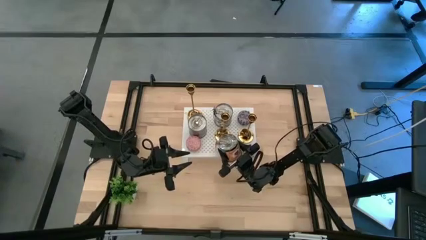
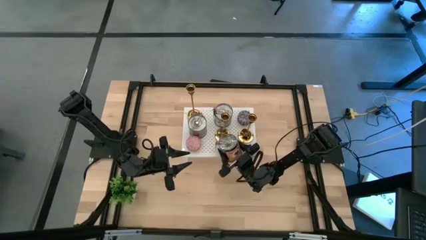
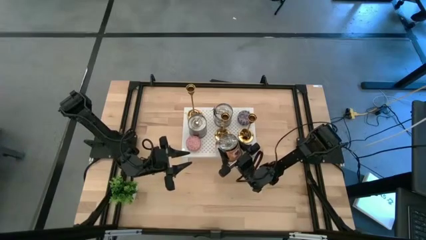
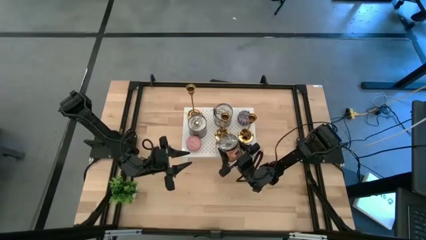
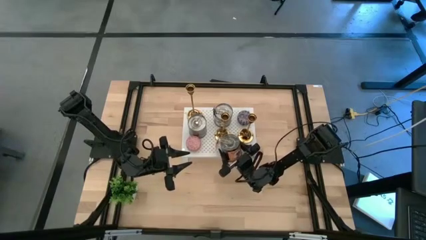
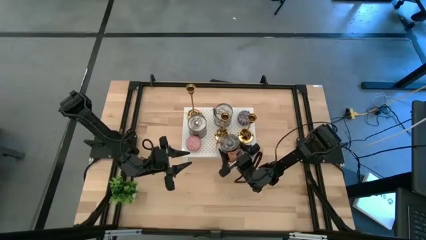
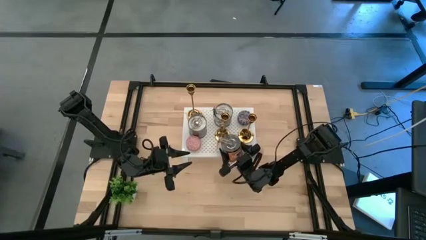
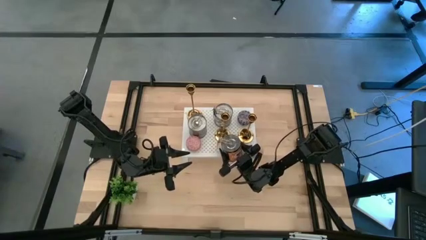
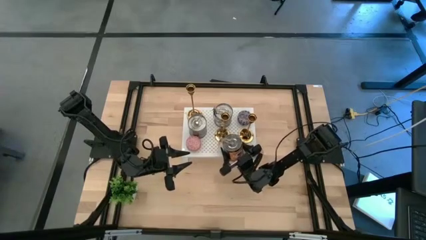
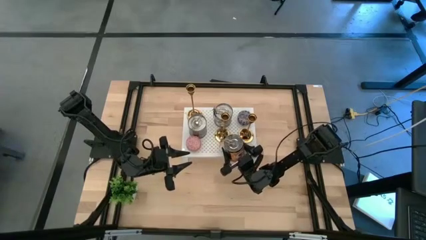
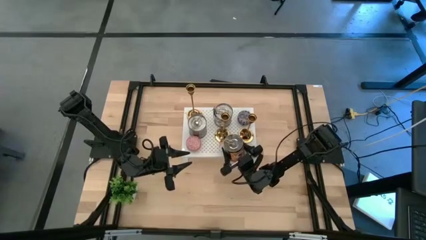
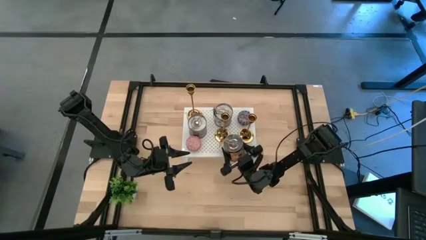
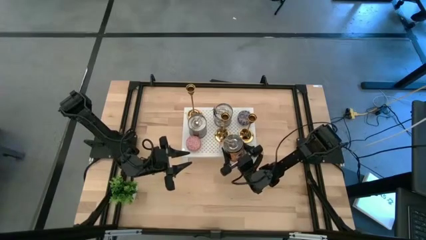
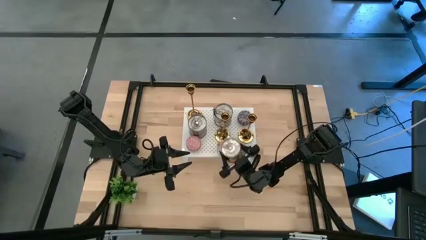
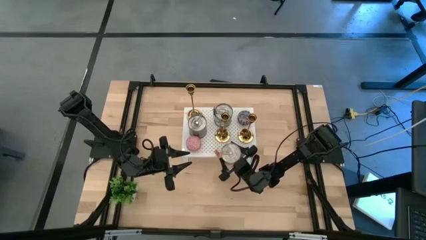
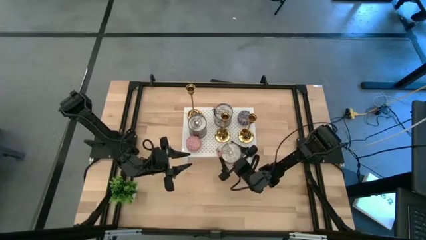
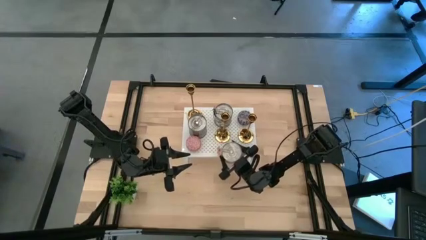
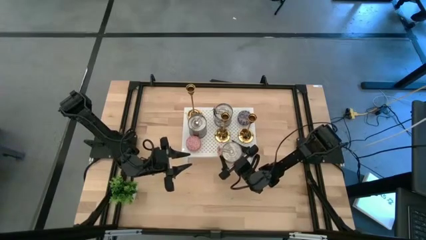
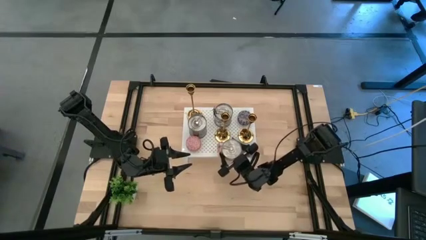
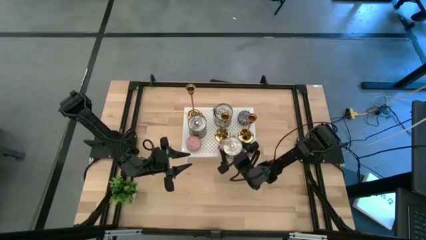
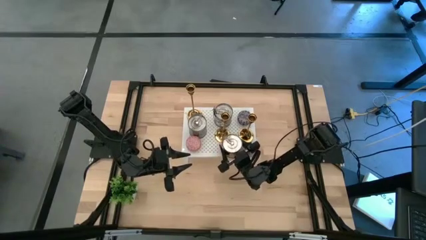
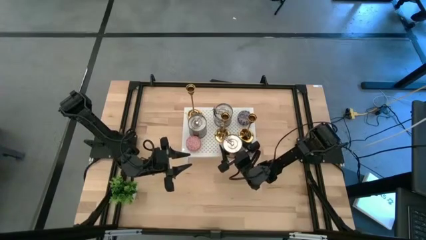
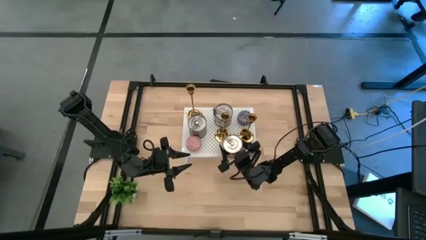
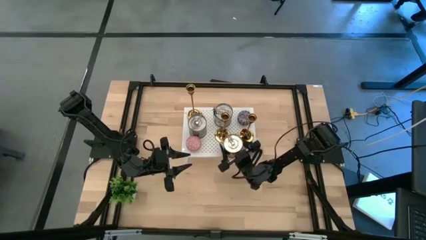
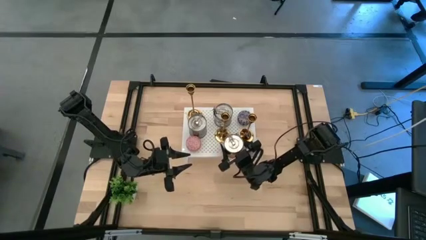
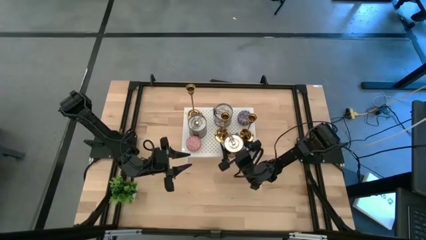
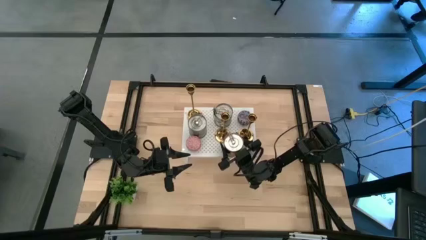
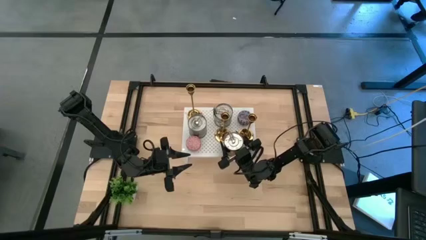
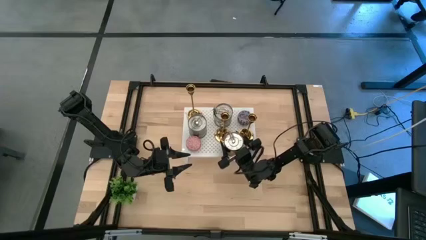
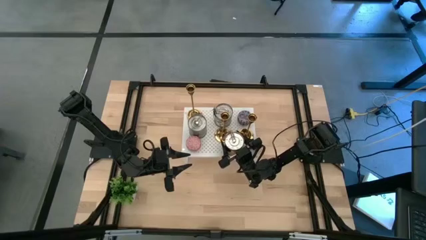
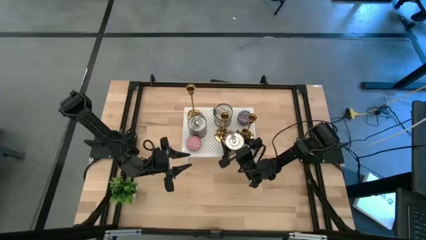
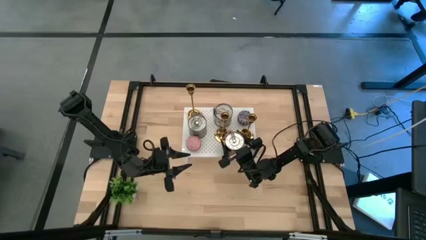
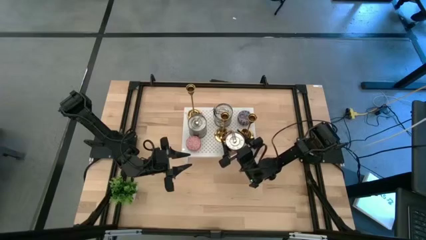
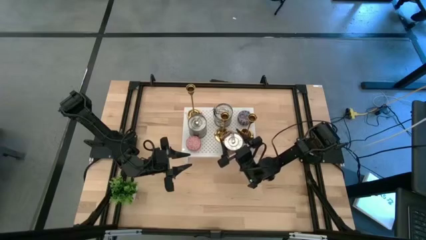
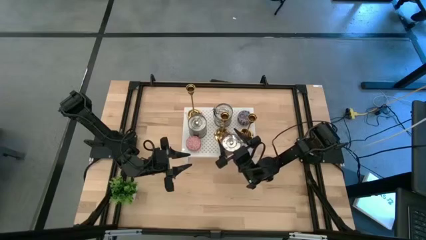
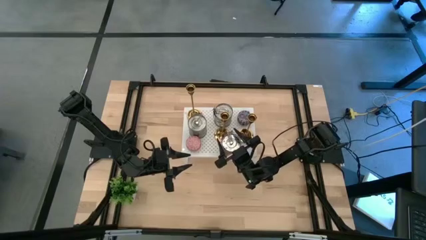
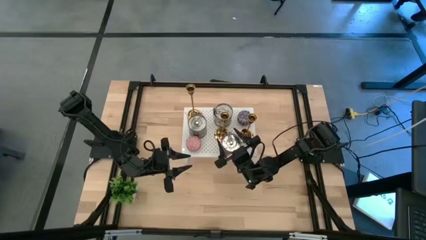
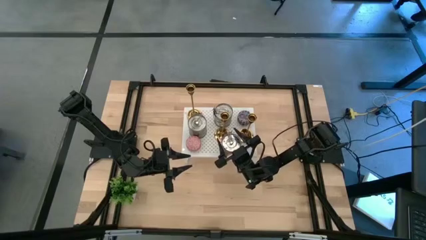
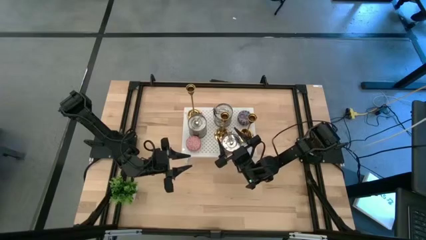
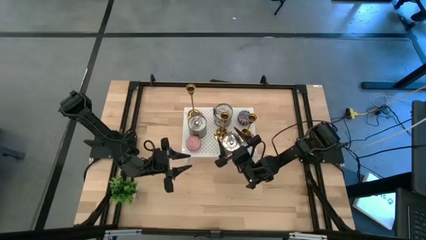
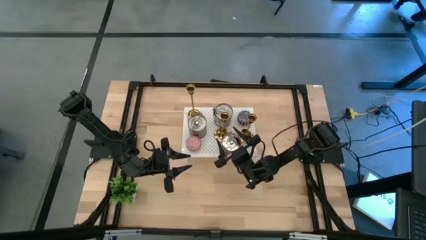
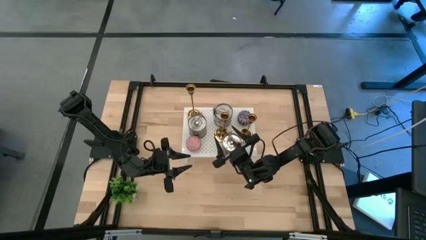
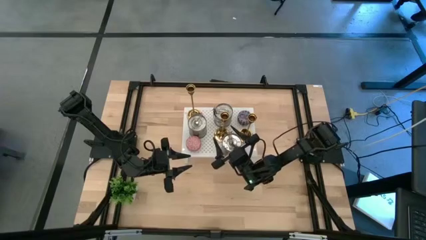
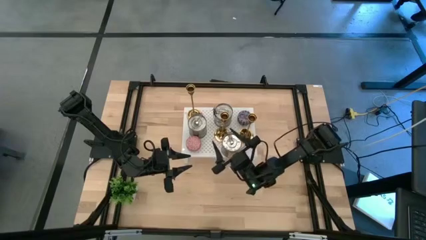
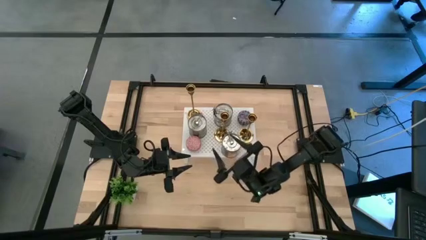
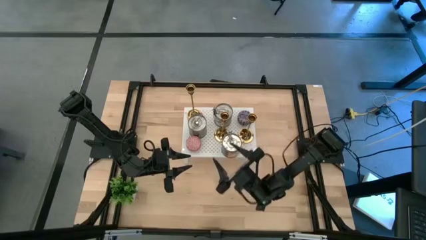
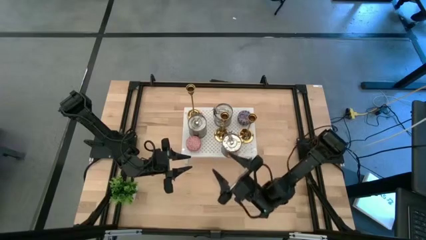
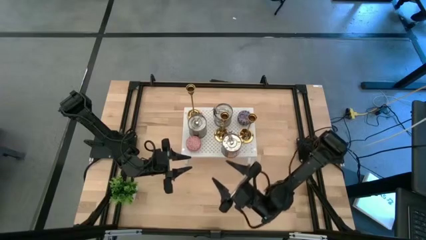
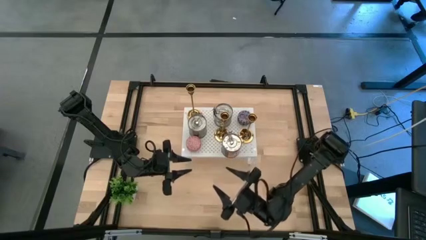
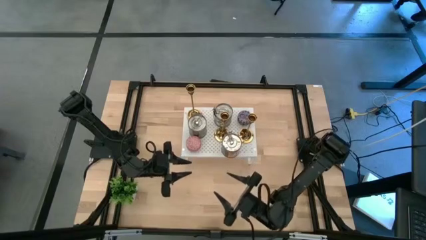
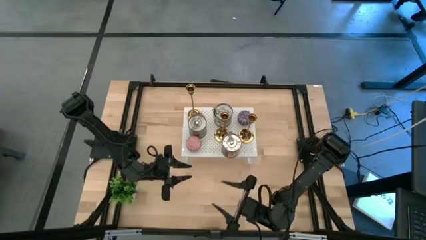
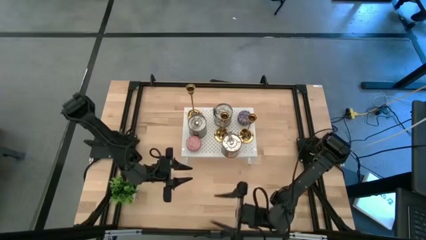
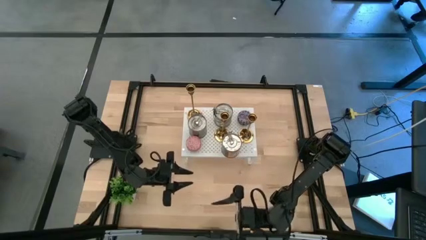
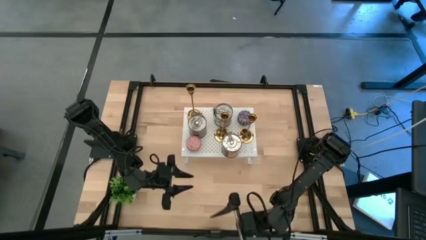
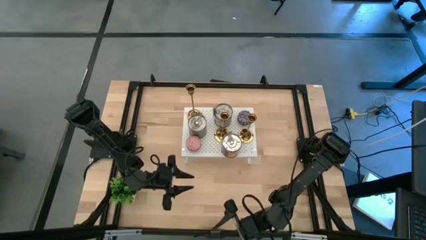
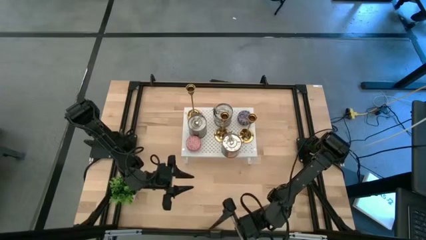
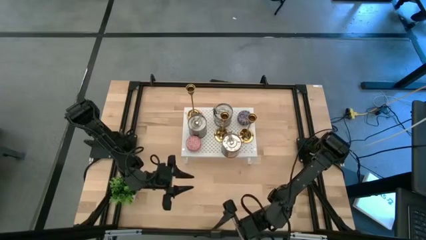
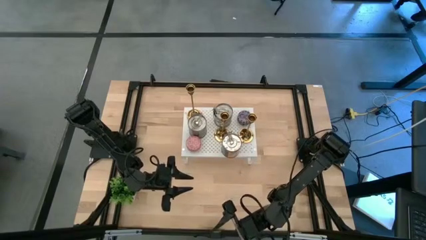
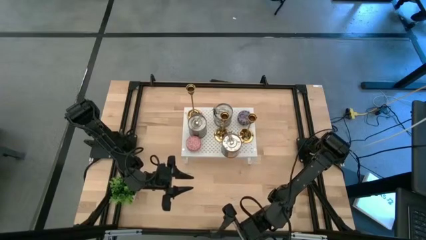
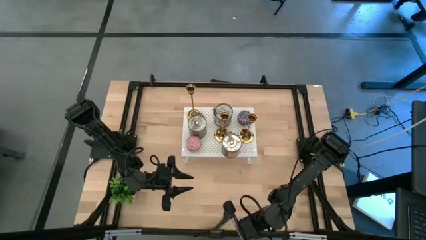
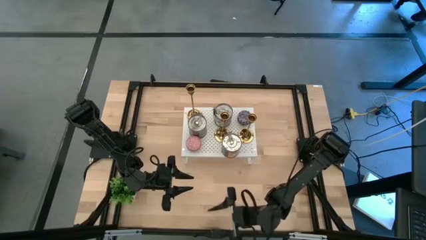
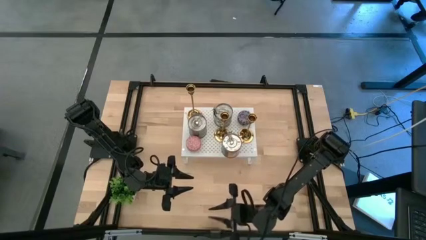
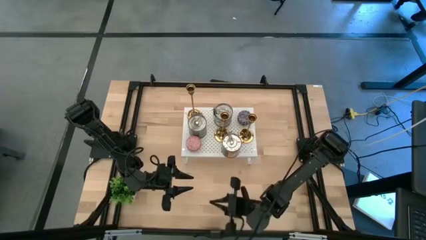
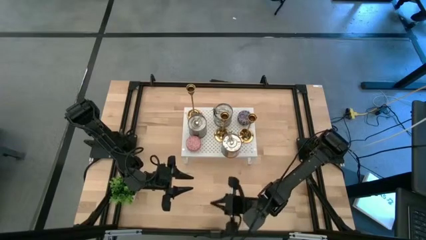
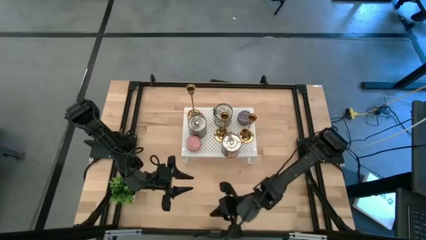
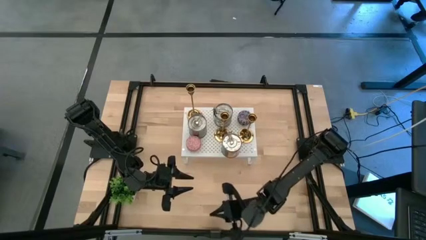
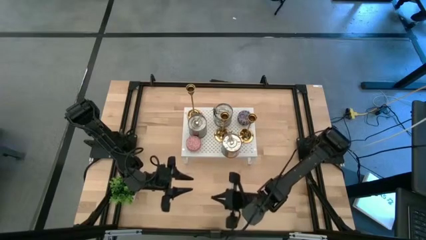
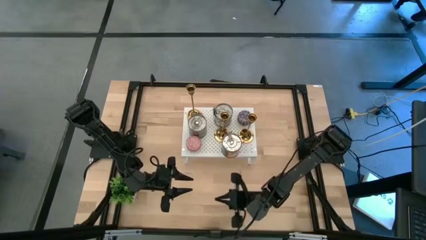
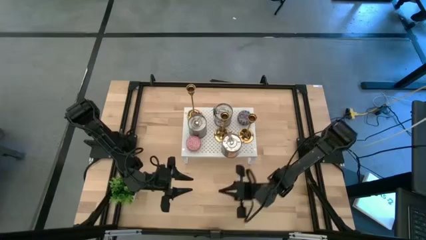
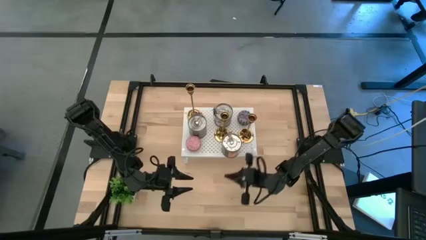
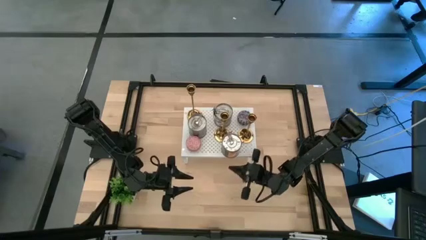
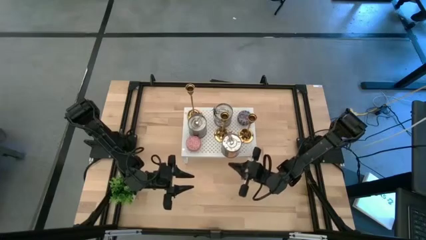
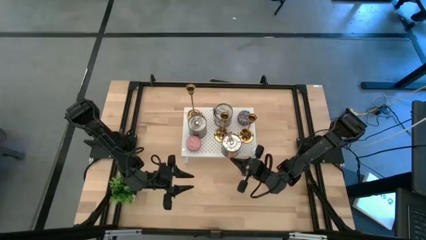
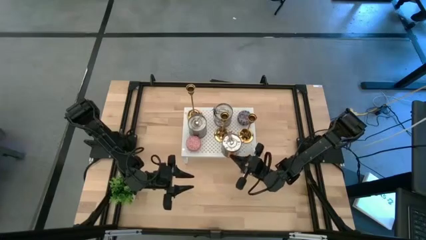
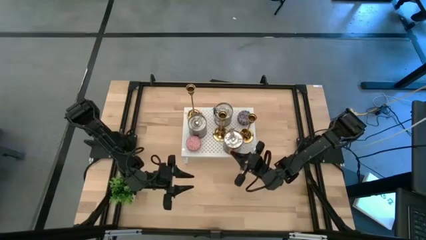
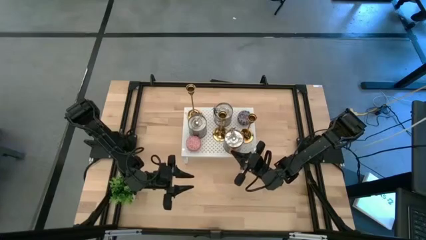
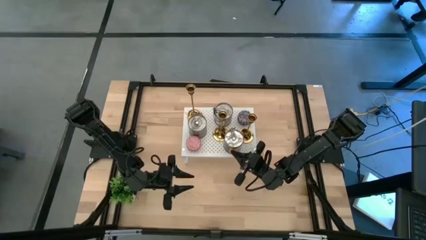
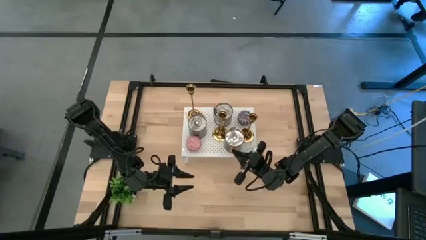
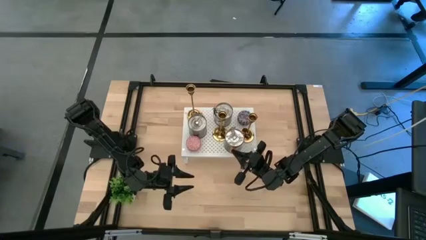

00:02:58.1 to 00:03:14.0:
Task: Pick & Place candle stick holders
Put the big silver scented candle on the shelf

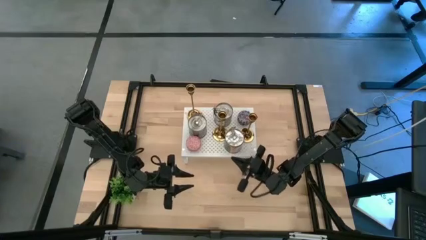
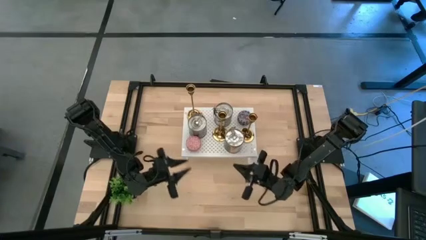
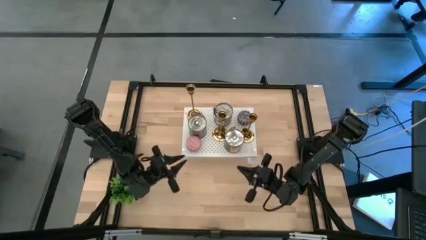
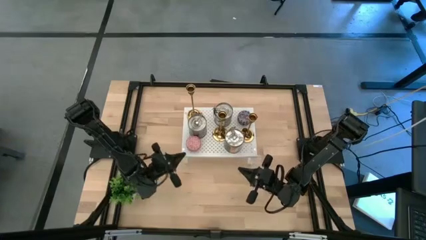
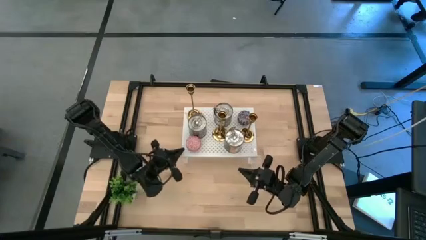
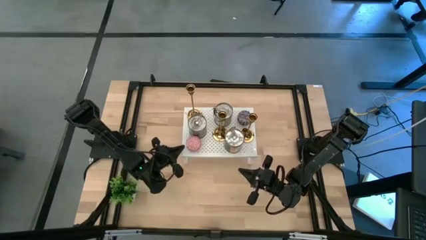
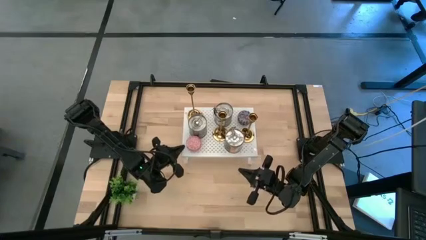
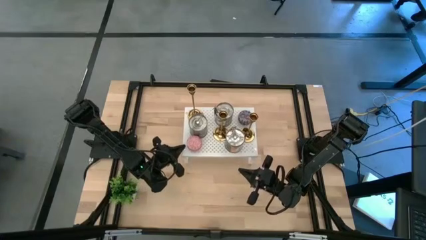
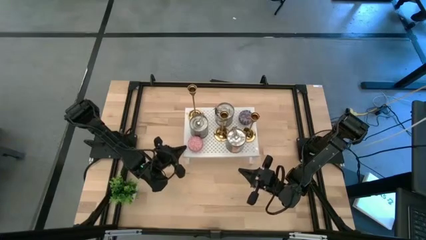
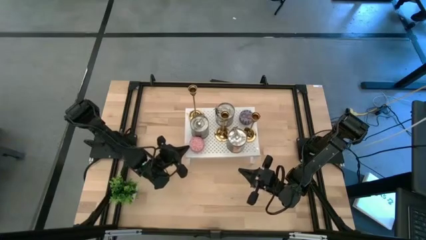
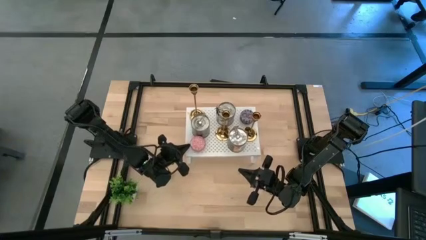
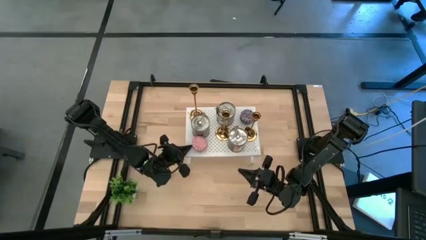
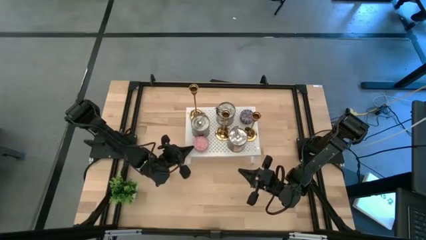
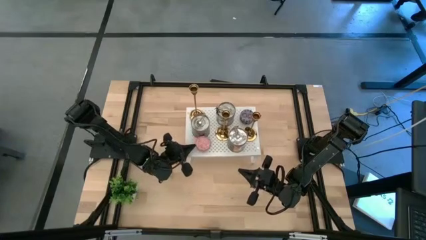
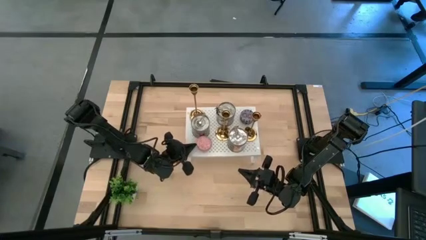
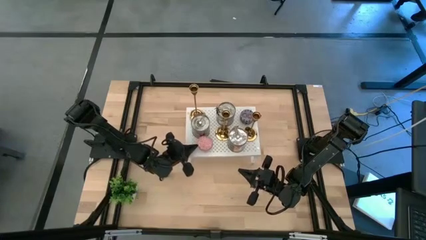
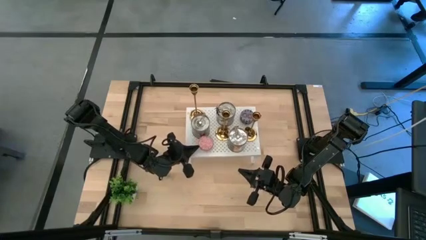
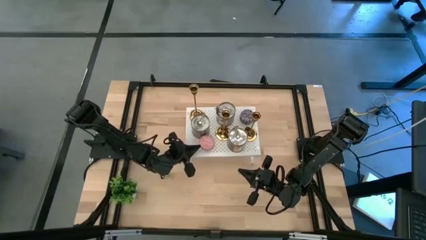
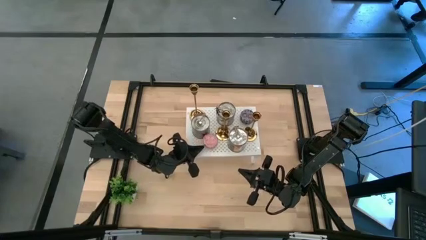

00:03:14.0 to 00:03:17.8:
Adjust the pink scented candle on the shelf
